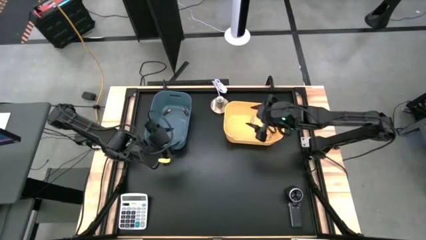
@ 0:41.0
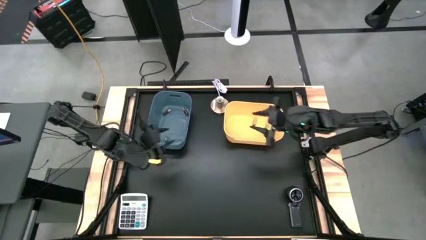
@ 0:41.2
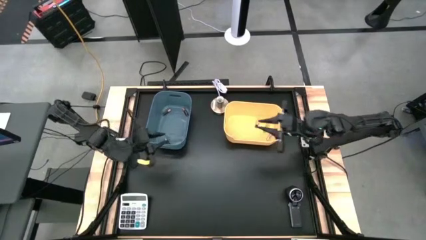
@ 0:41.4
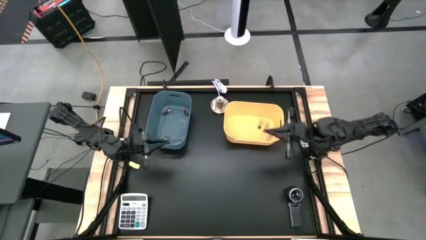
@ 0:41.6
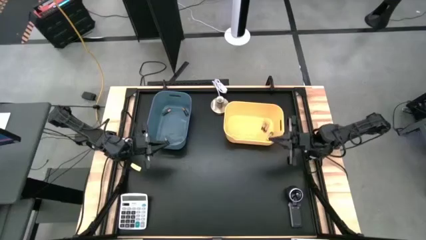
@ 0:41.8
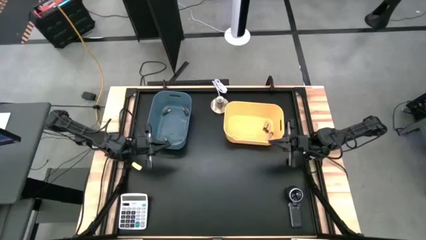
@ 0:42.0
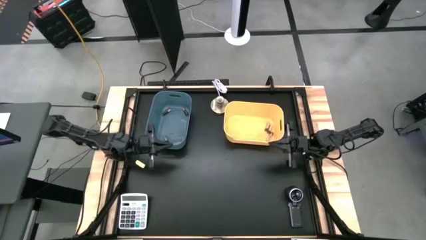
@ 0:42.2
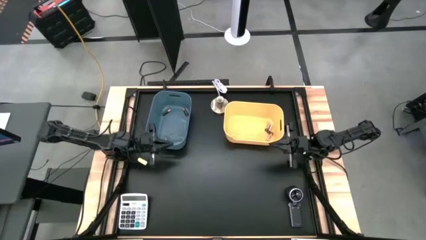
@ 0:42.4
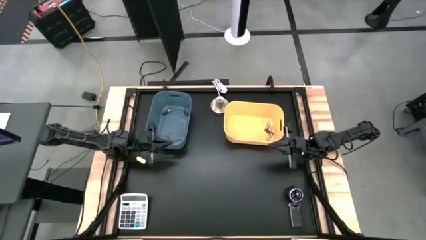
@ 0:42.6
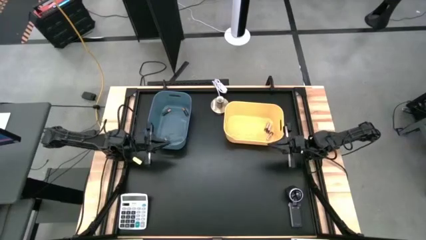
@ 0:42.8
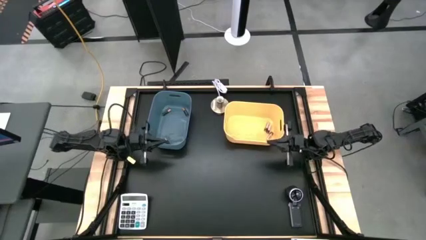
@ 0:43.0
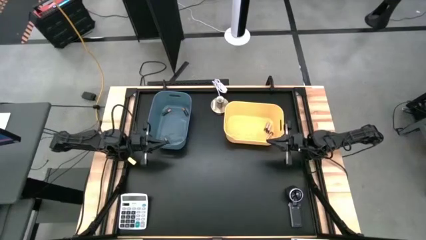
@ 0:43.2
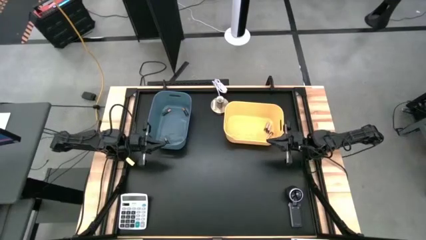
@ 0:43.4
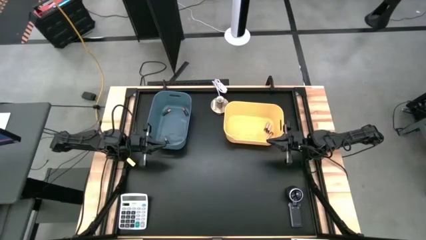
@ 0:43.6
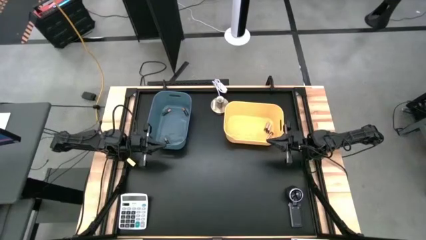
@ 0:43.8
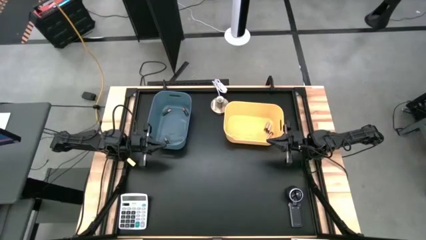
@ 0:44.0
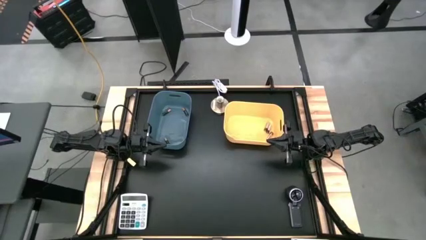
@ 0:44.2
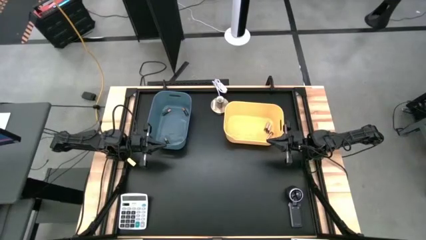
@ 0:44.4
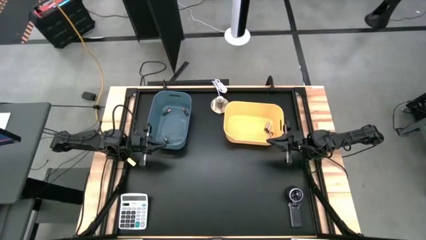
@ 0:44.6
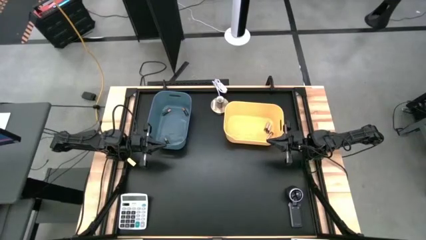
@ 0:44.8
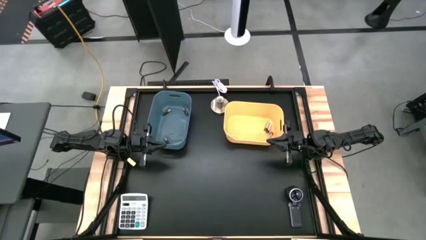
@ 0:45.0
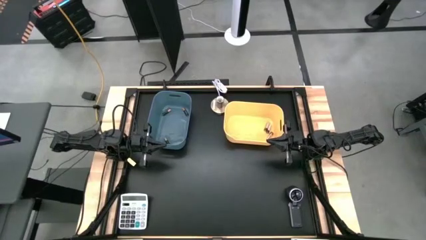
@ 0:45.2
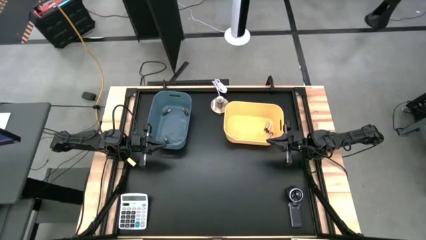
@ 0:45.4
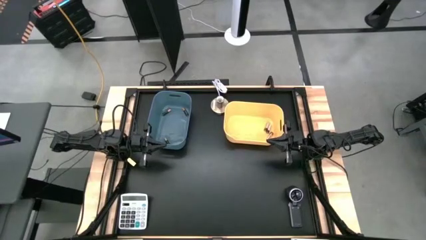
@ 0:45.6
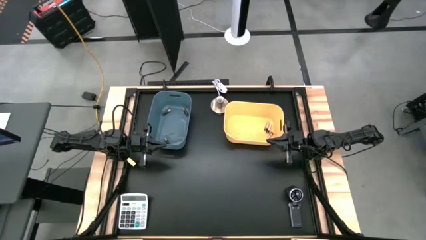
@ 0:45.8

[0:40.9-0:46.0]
Task: Sort batteries
Return to Home Position

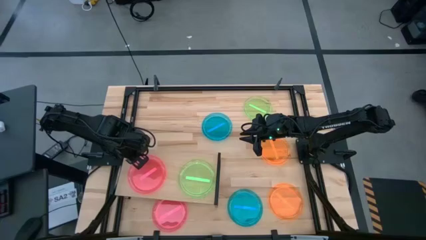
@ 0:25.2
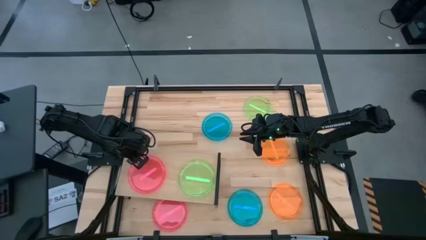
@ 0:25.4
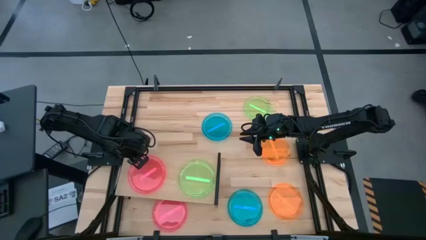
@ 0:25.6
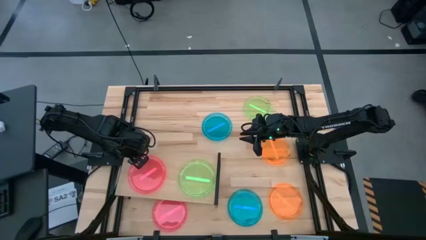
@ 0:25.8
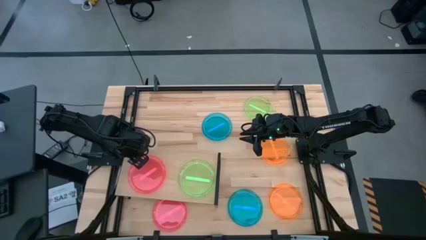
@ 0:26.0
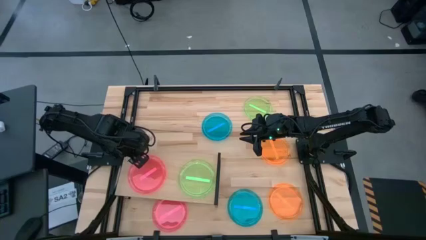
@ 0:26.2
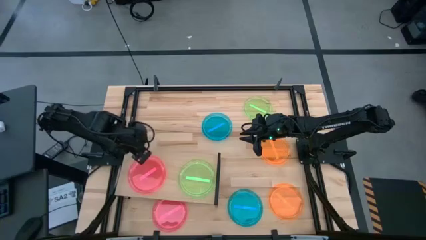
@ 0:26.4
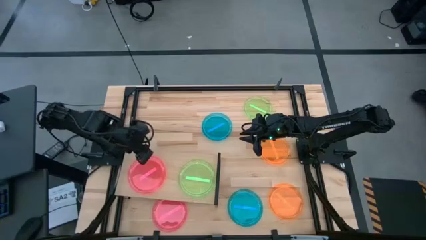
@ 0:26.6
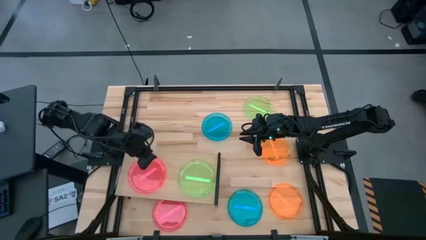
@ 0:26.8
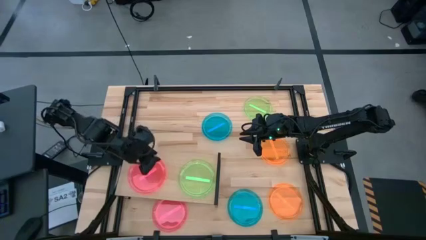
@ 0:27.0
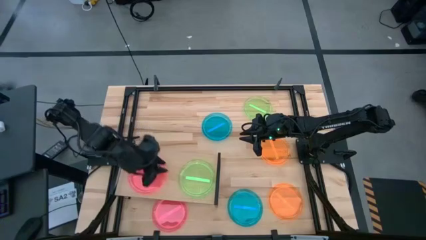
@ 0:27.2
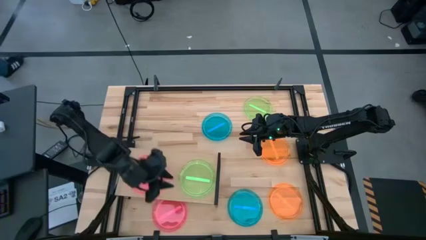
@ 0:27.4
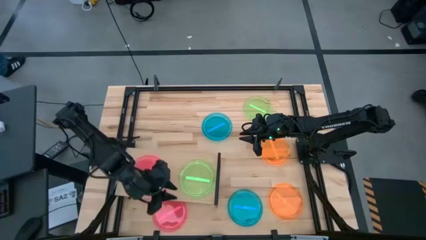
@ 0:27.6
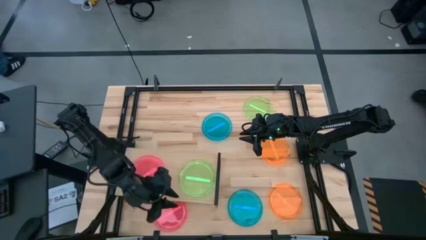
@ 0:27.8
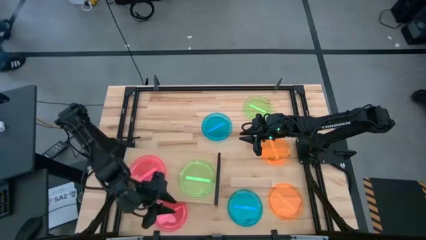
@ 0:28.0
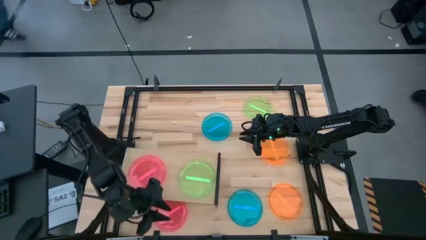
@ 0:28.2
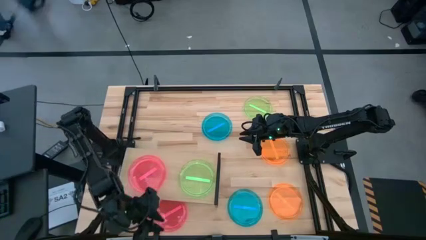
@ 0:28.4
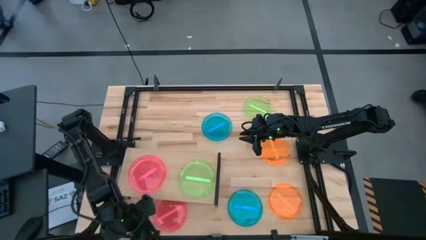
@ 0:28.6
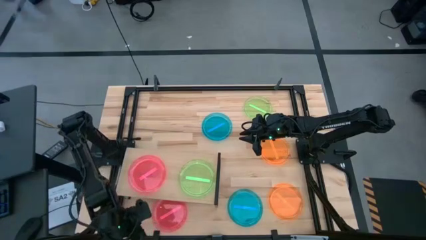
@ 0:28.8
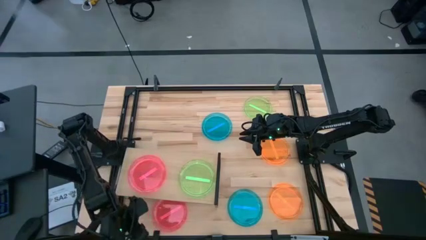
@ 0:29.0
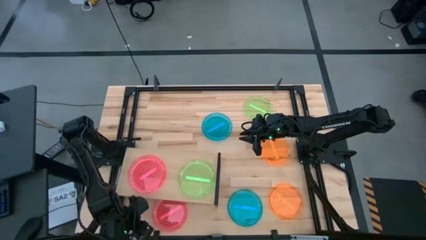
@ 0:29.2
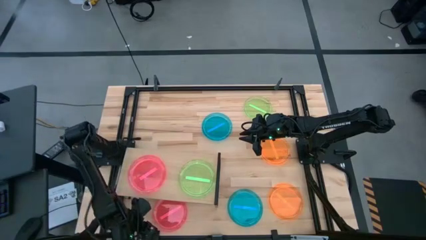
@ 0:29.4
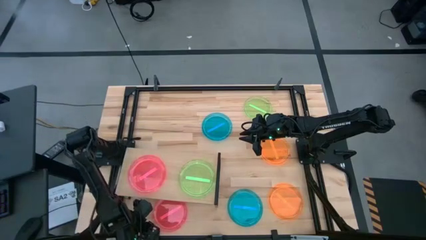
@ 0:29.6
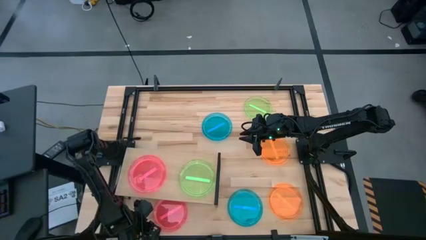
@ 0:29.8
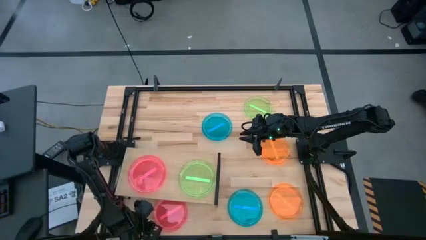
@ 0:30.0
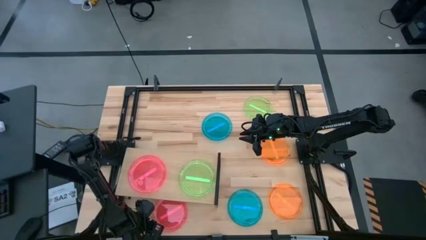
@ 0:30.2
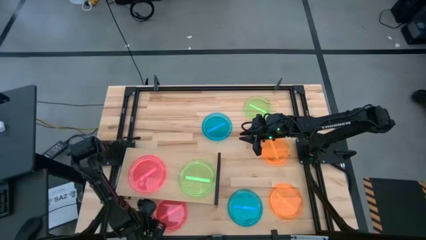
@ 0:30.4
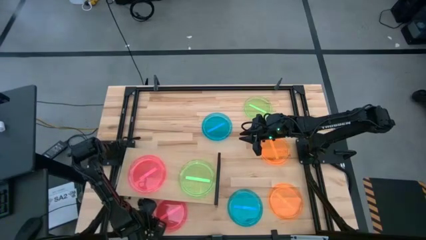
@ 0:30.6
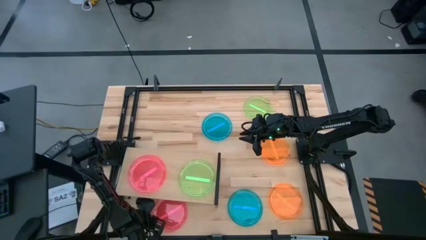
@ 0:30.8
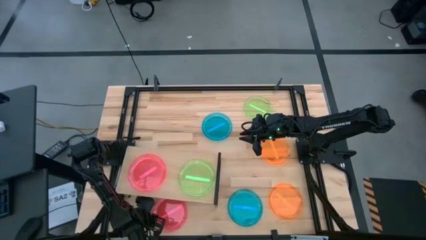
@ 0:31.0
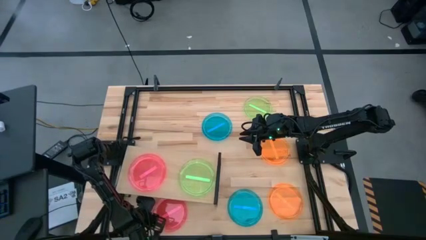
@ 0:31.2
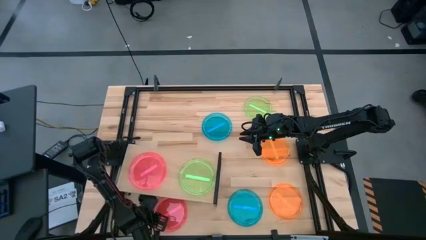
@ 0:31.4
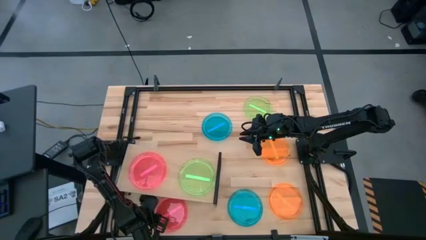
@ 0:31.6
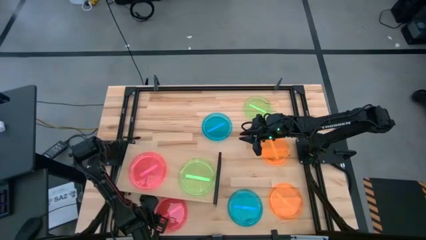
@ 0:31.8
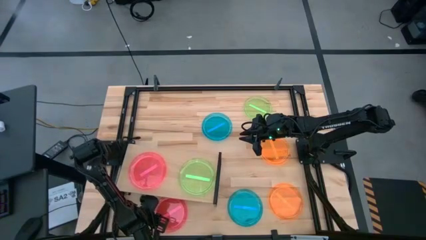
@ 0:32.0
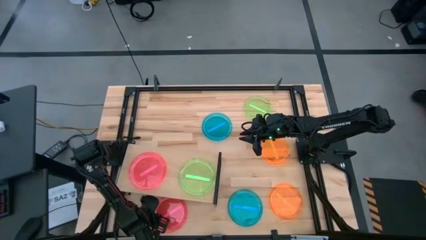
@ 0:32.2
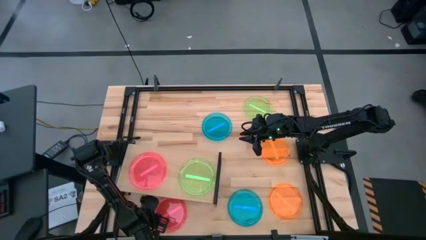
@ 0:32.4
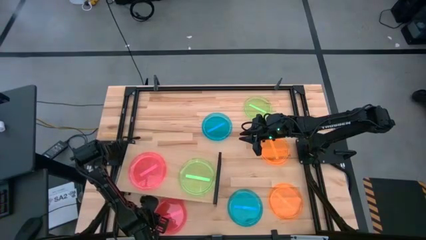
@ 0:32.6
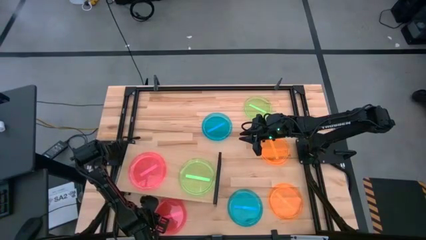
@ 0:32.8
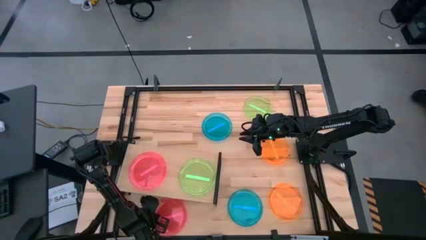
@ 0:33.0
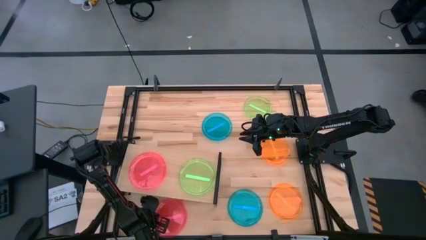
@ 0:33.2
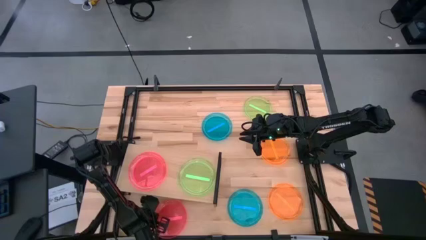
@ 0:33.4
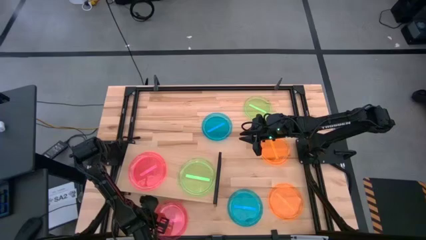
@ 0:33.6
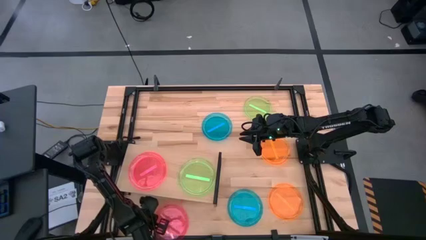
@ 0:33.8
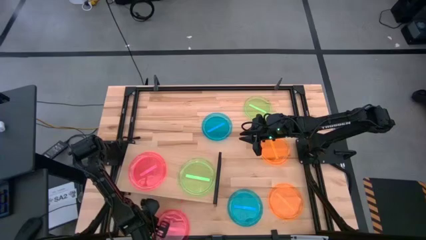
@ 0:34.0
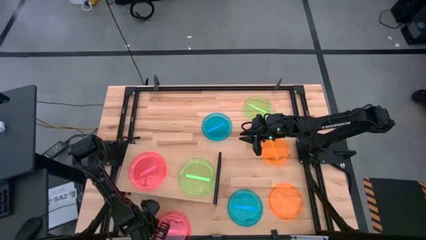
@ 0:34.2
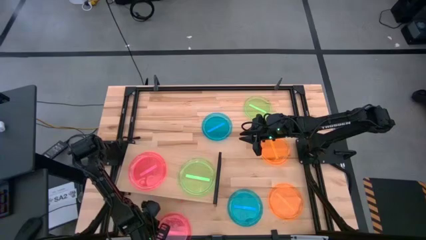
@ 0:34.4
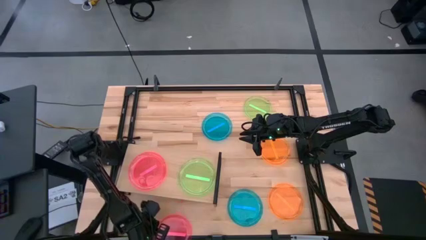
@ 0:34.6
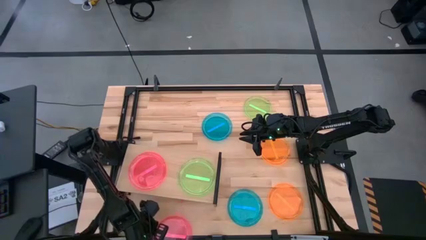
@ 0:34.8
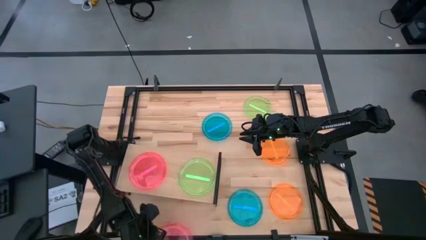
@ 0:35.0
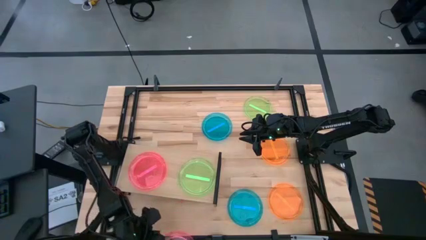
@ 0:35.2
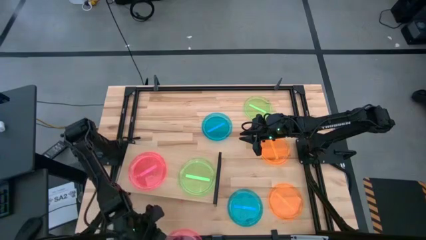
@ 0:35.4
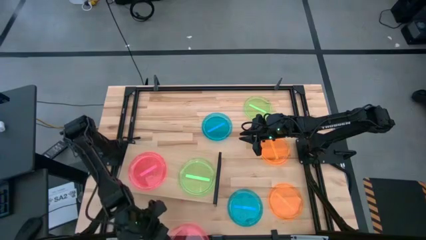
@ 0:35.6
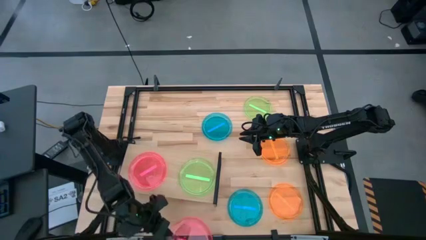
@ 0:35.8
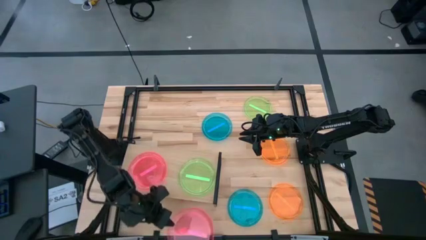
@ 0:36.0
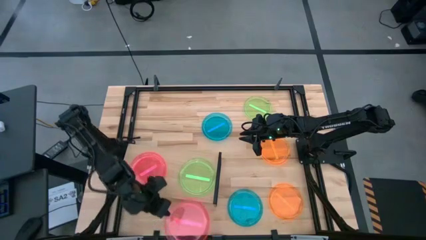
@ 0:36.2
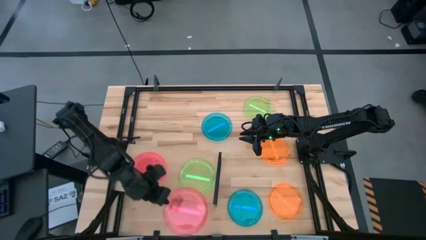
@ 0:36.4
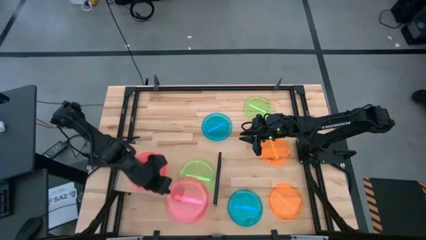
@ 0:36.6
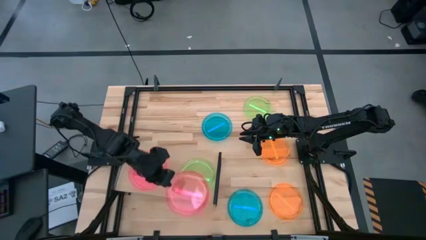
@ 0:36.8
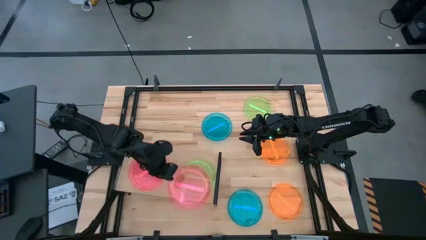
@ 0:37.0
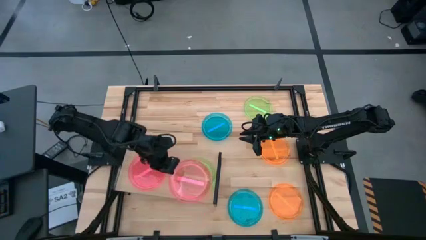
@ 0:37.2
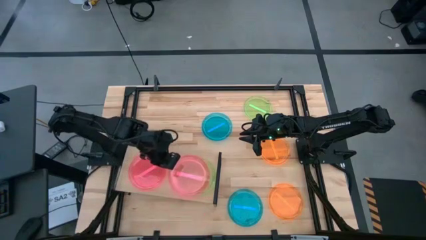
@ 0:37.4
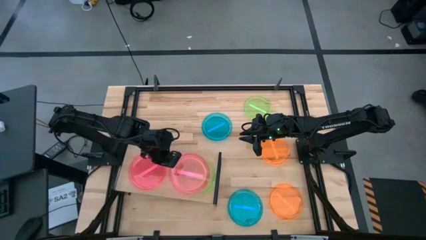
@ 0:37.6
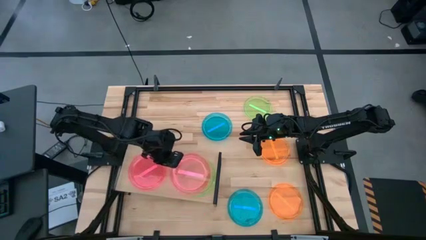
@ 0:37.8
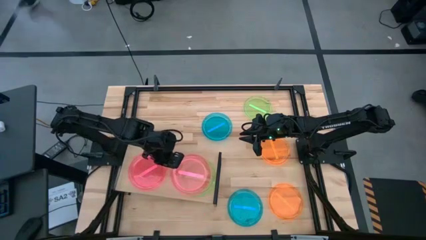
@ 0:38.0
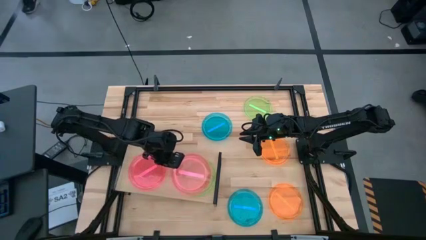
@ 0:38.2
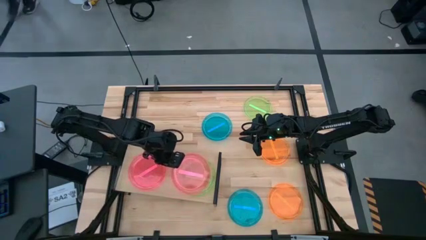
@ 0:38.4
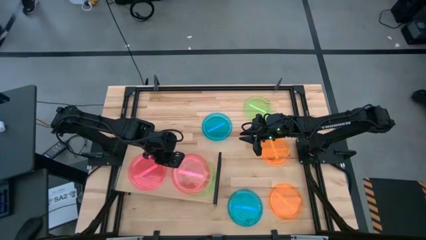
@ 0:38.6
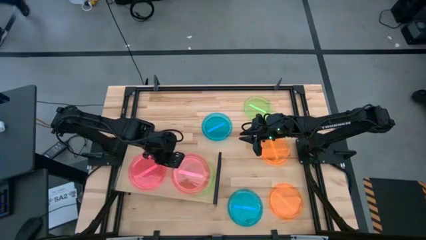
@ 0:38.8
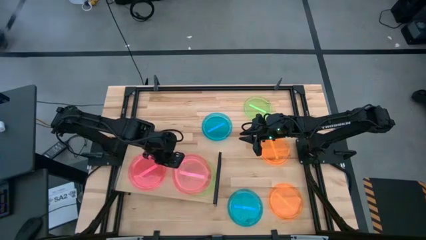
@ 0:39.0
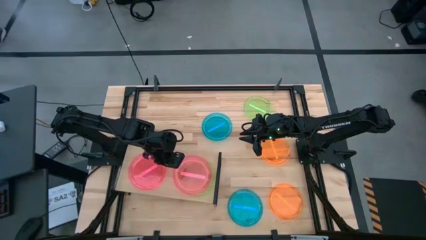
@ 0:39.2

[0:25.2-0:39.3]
Task: Place and stack plates onto a shelf
Stack the red plate on top of the green plate on the shelf
